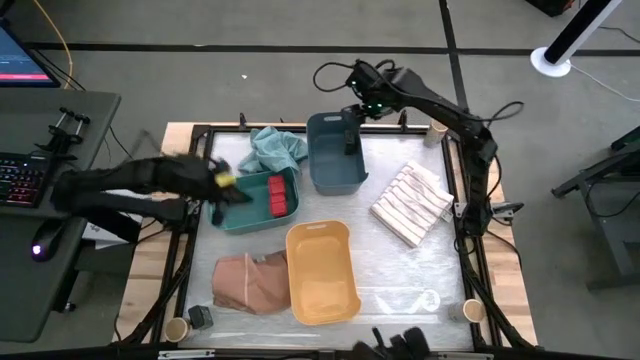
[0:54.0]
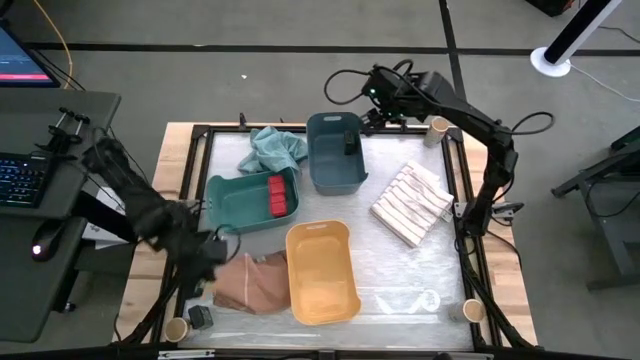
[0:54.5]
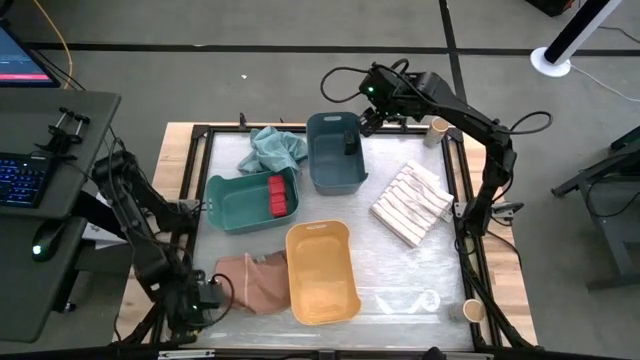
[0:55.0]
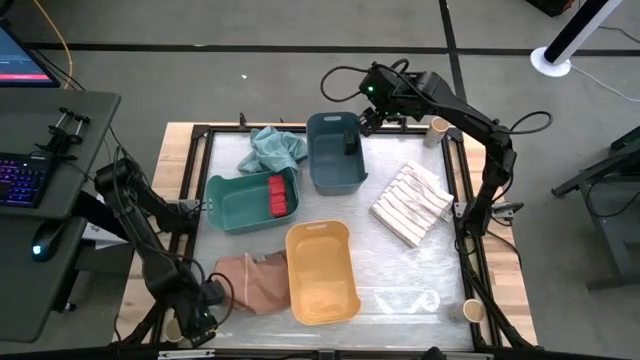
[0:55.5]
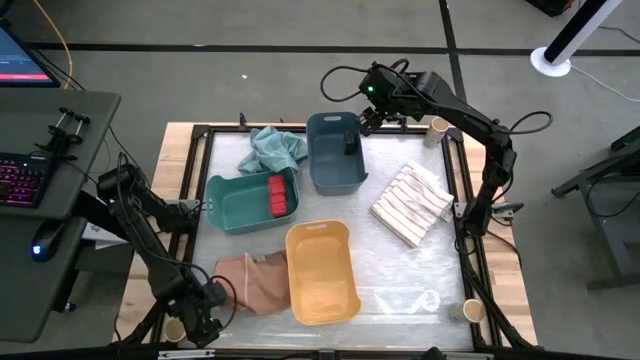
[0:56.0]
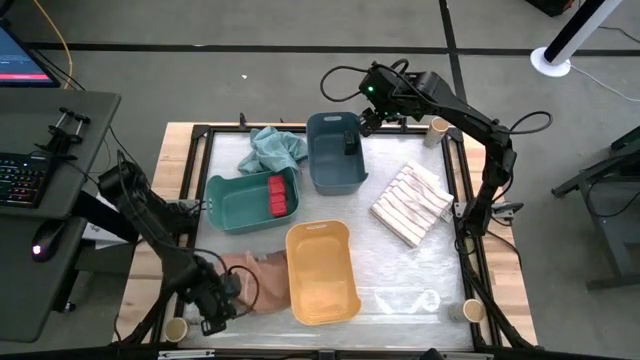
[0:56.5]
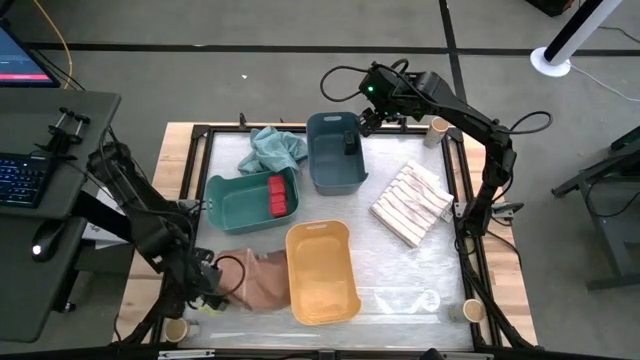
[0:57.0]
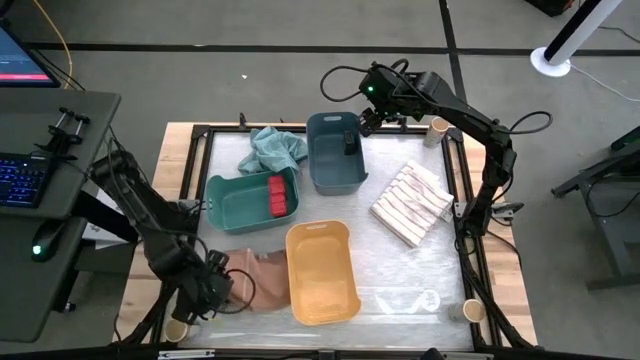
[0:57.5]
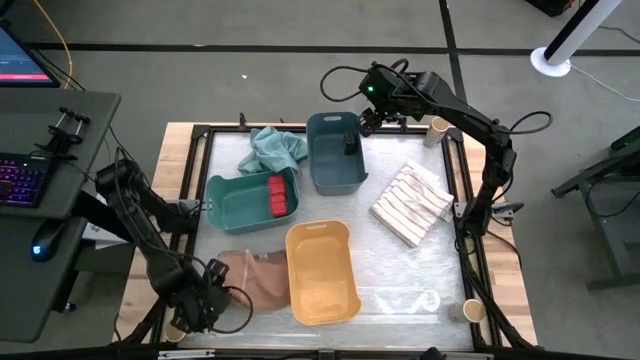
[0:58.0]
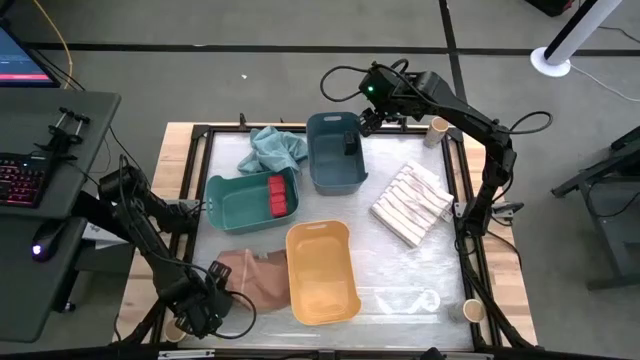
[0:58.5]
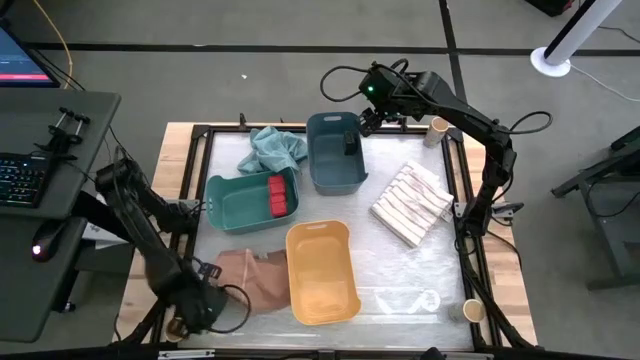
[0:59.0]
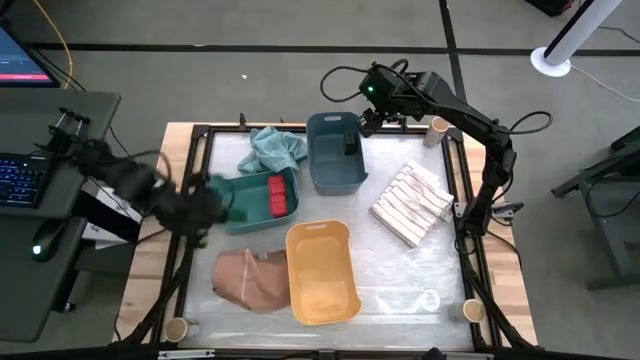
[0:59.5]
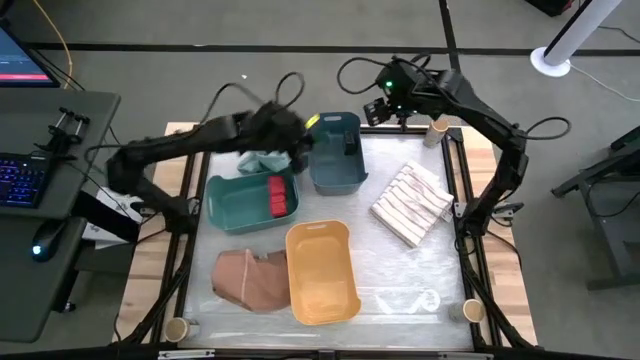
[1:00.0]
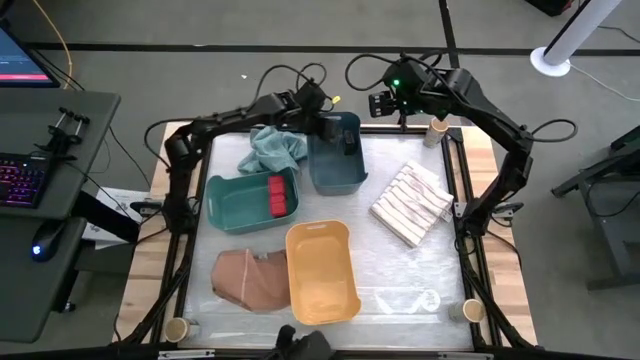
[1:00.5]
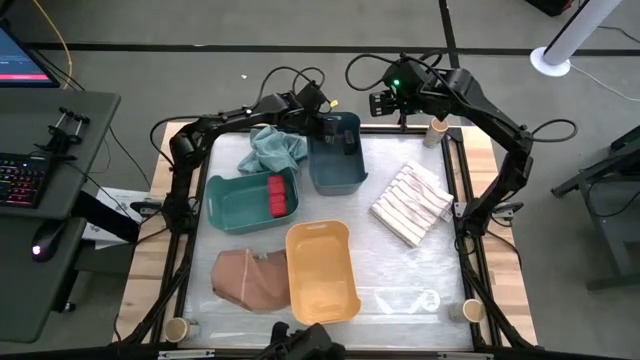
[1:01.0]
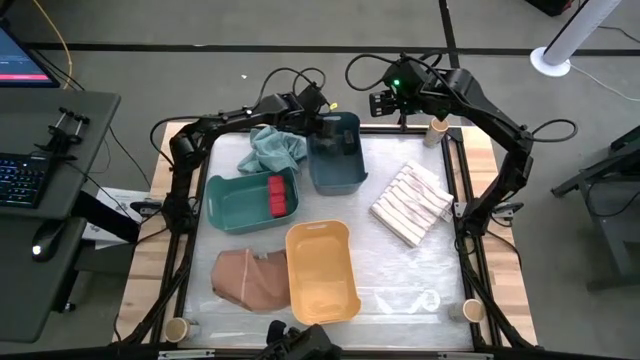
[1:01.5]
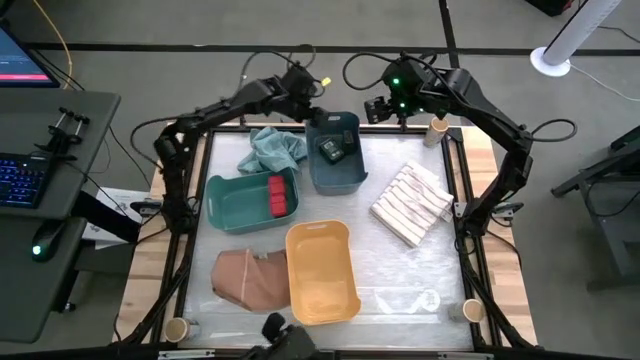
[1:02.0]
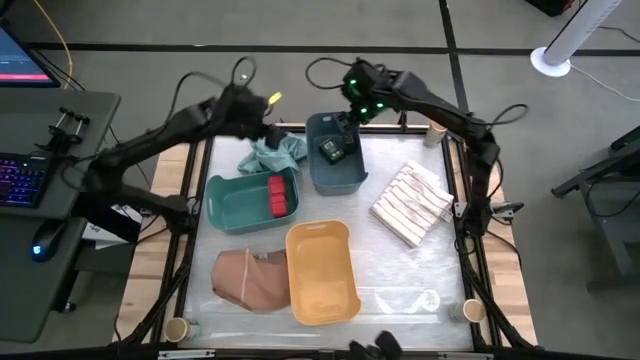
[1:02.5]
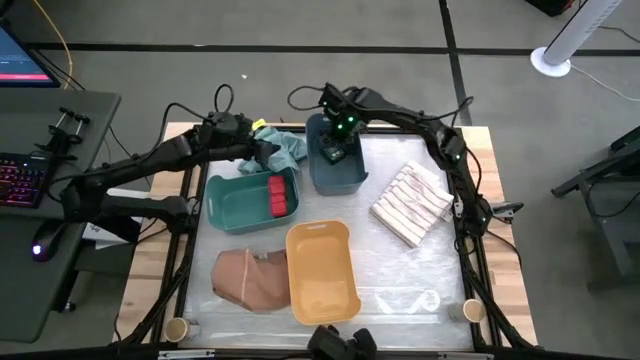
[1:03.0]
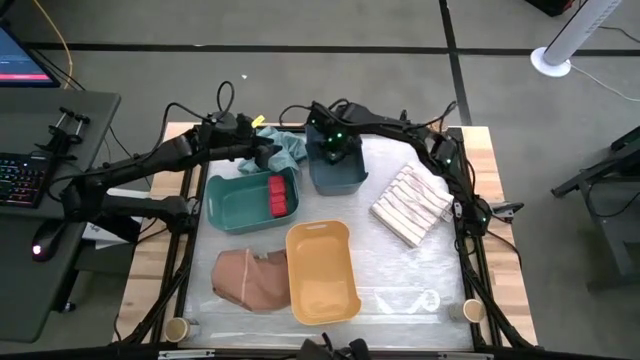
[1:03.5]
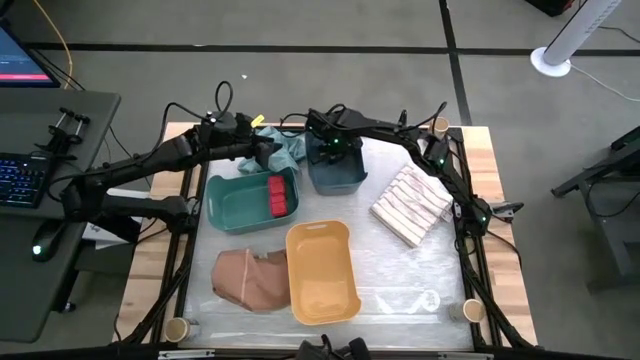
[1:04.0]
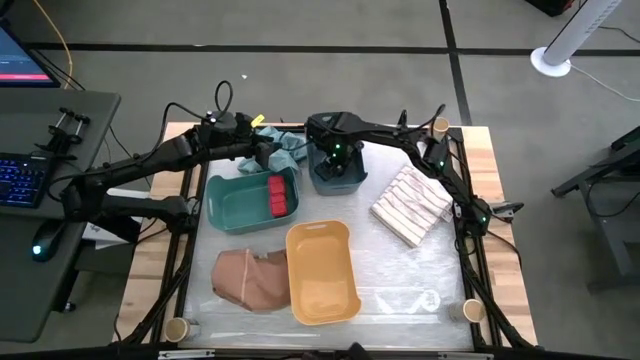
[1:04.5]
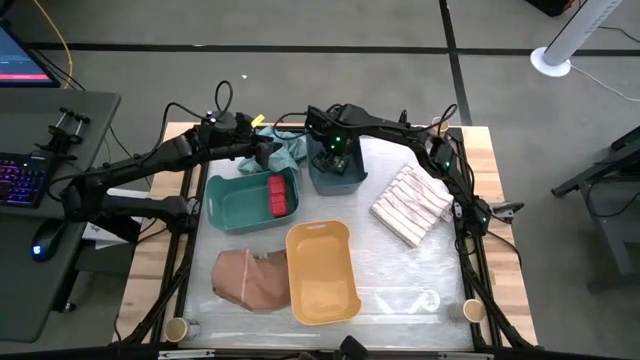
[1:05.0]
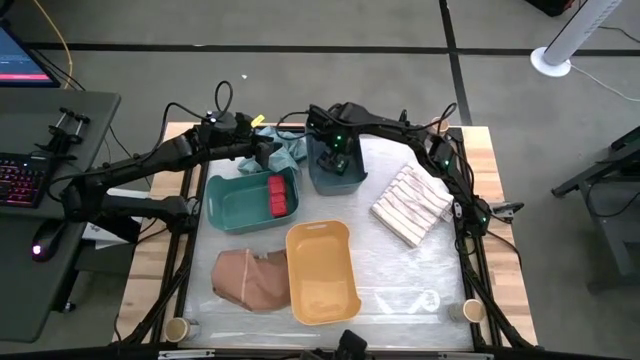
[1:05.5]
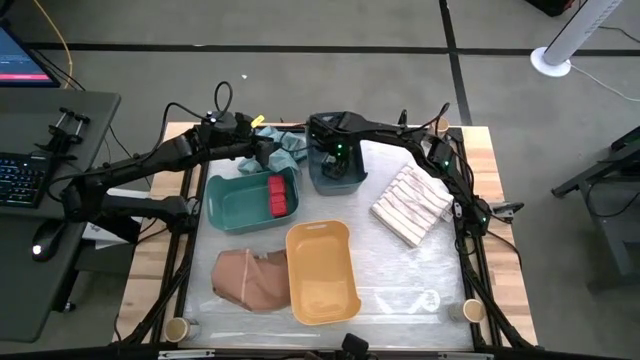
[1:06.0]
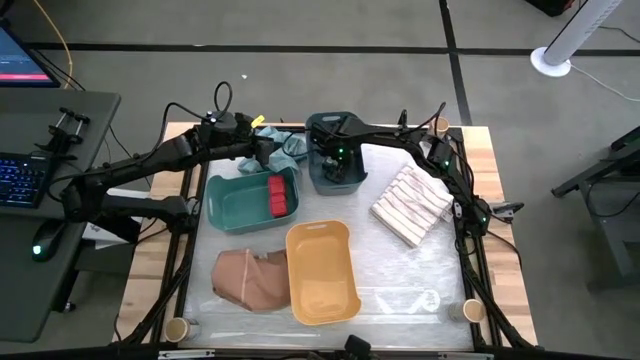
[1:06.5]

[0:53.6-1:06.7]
Task: Sort spices by type
Put the black seasoning can into the blue bin

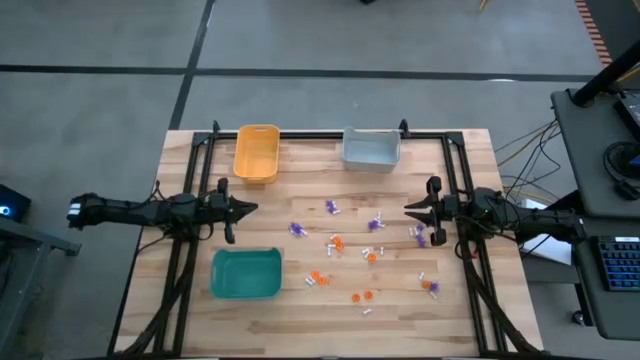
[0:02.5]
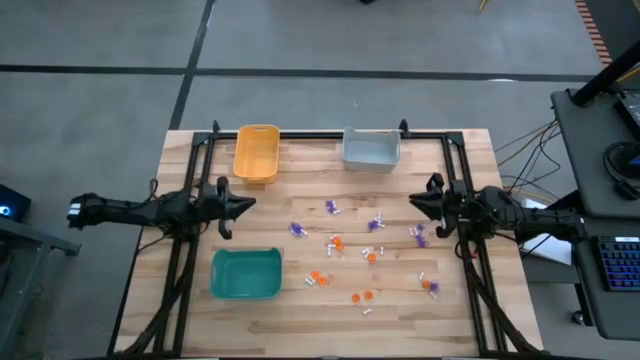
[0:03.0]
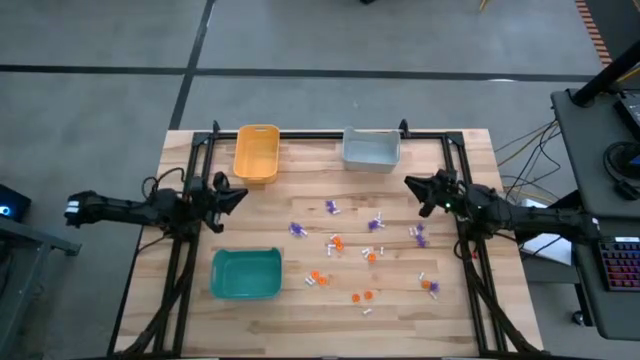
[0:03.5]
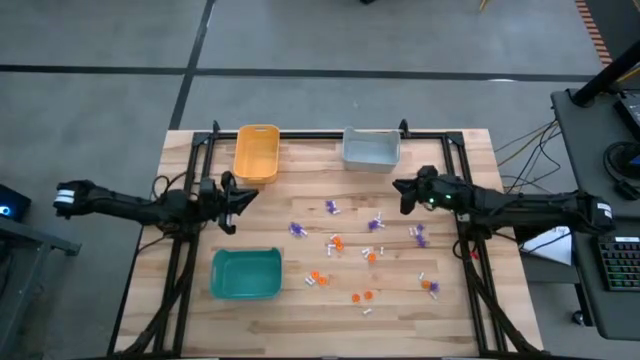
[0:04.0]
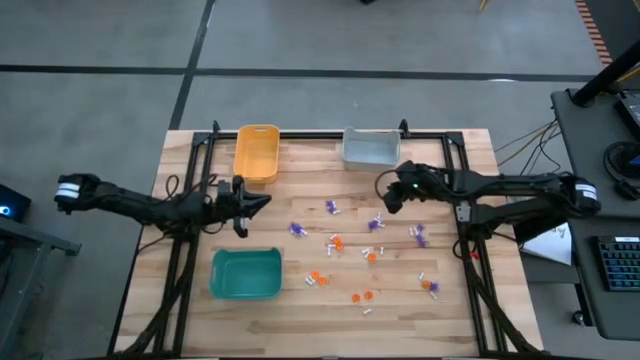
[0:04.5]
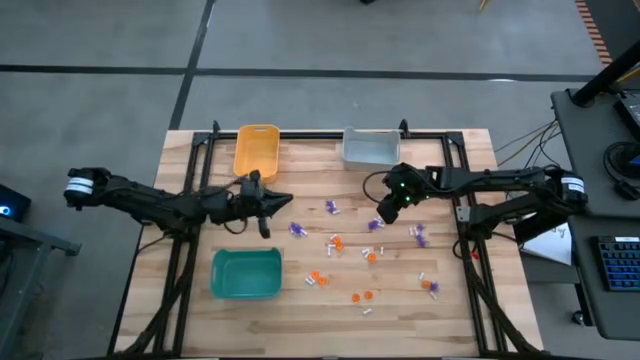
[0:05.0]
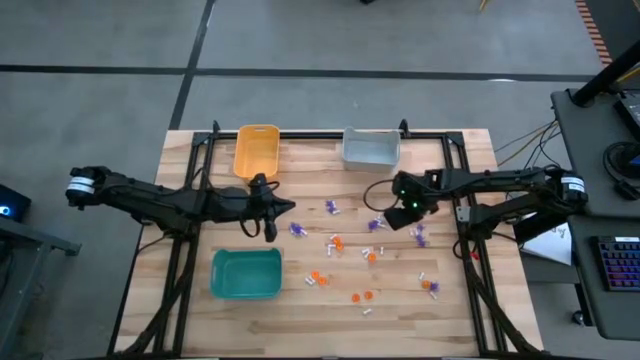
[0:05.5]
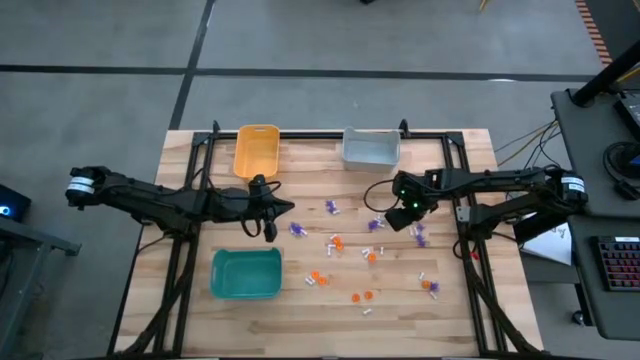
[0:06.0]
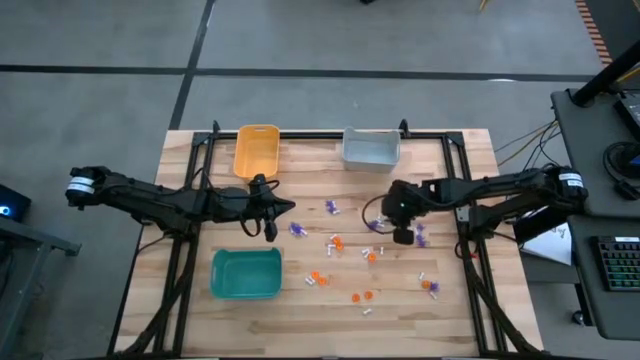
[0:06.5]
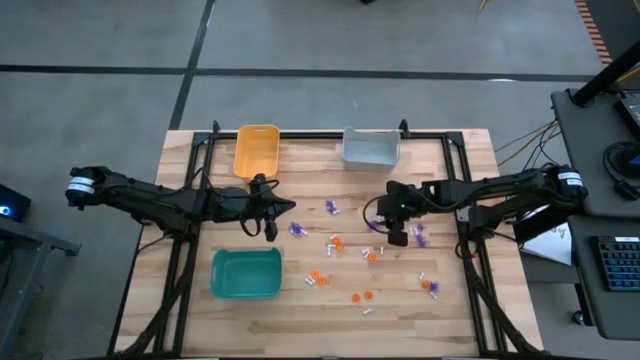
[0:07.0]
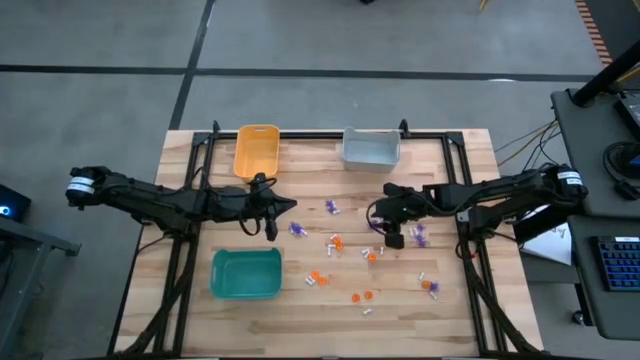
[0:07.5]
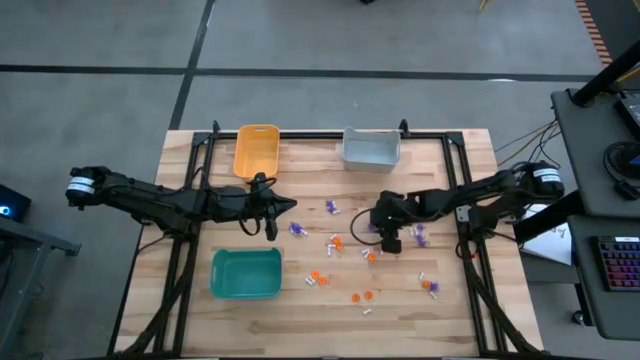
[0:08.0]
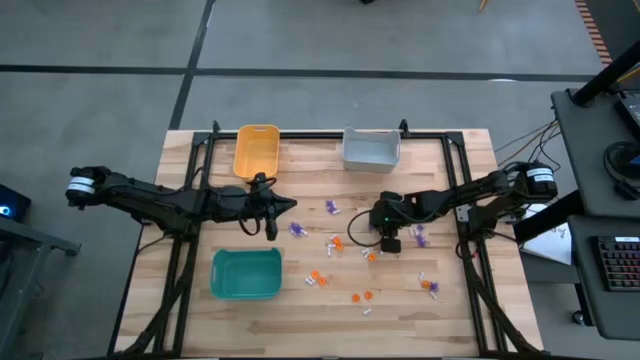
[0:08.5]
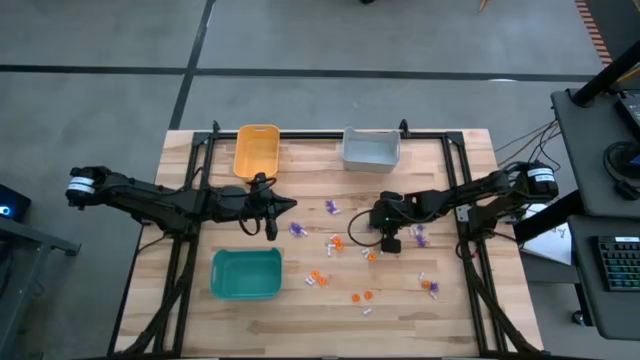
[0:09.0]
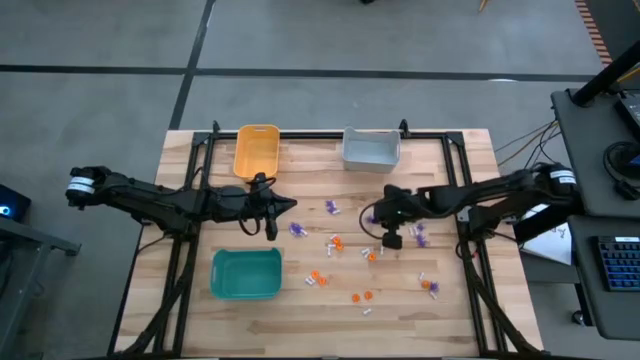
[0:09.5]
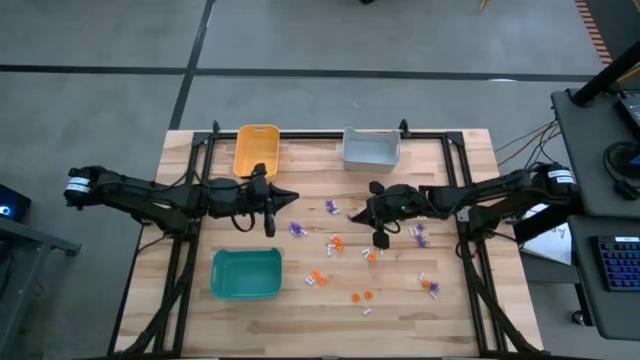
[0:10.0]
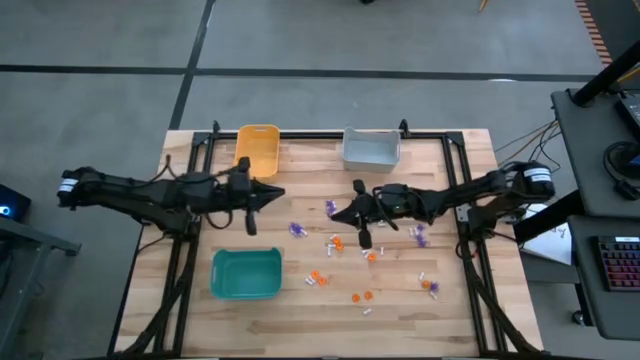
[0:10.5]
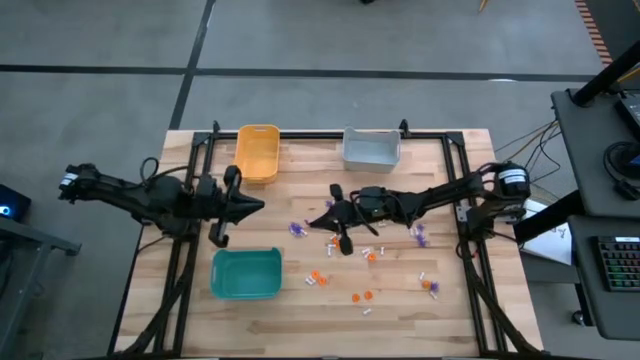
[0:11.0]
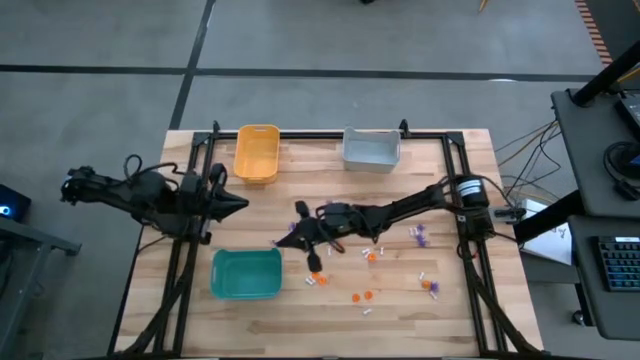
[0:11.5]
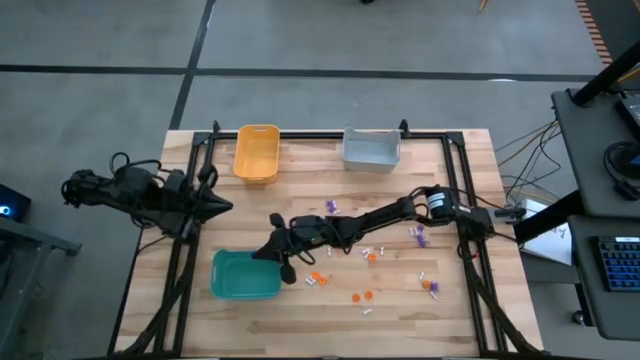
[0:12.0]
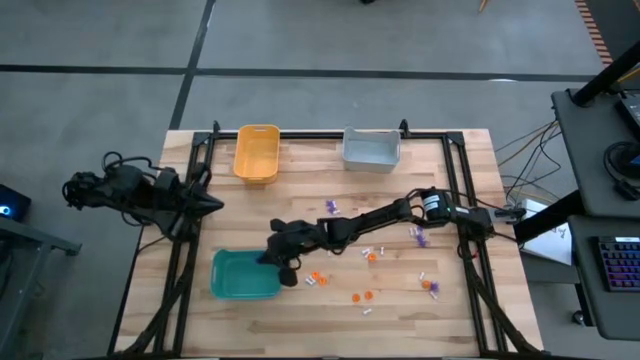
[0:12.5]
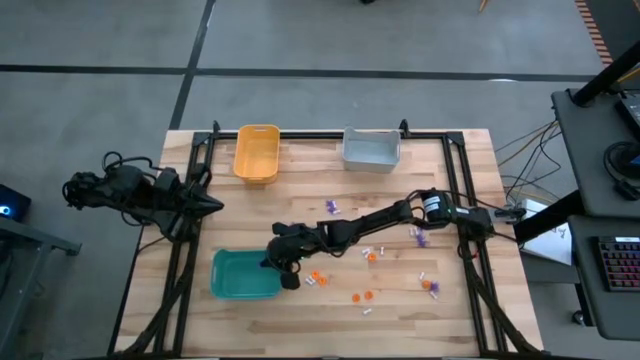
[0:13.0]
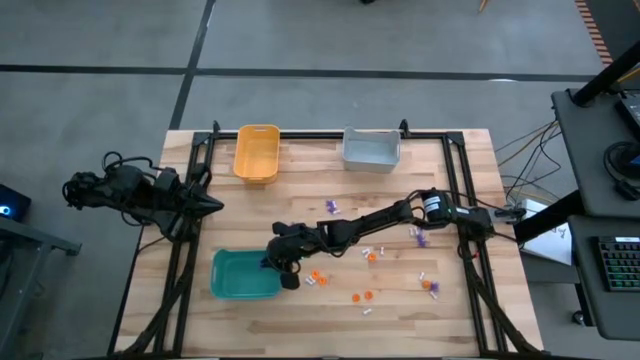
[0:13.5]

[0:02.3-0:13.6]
Task: Sort Halloween decoration
Put the blue spider toy into the green bin
